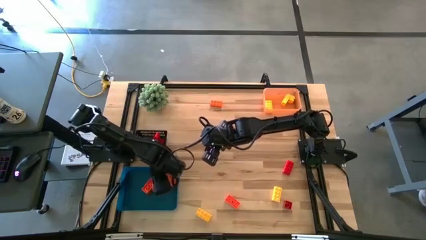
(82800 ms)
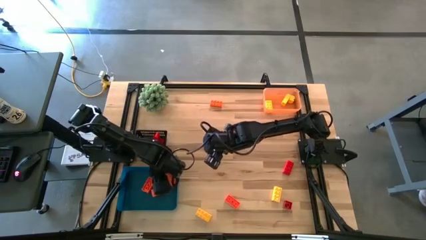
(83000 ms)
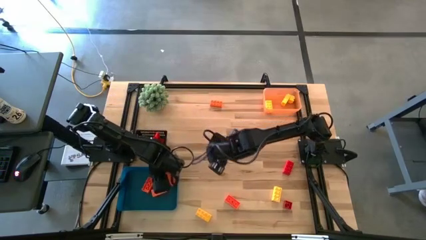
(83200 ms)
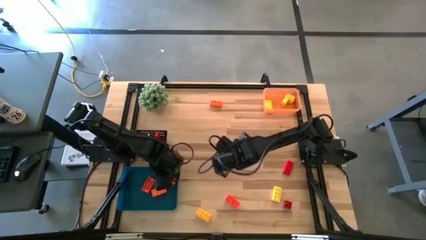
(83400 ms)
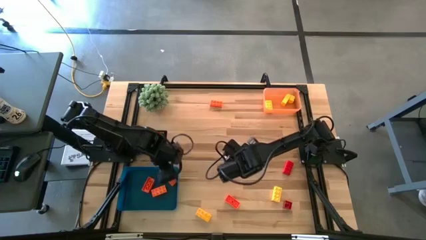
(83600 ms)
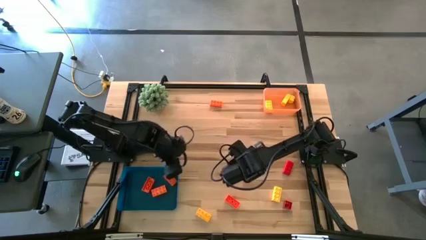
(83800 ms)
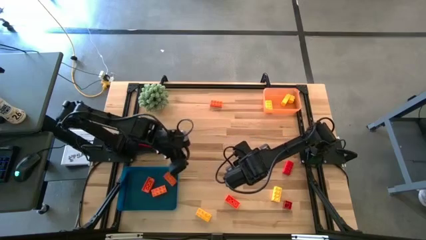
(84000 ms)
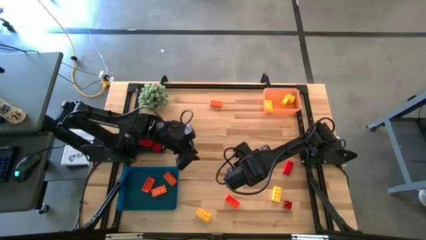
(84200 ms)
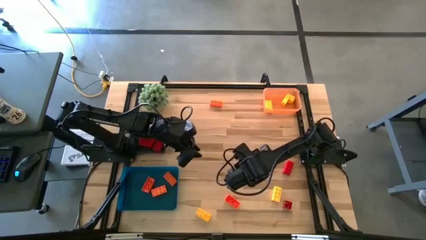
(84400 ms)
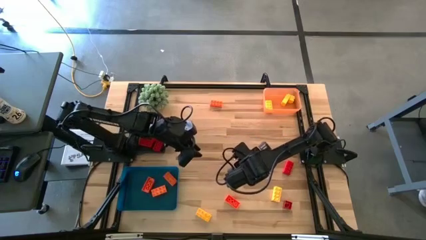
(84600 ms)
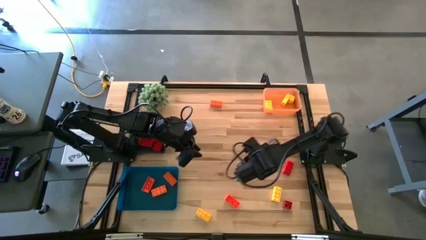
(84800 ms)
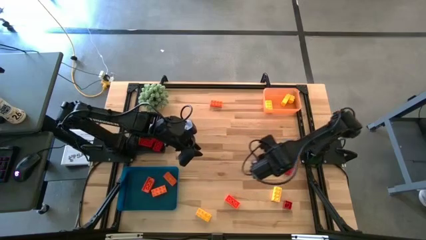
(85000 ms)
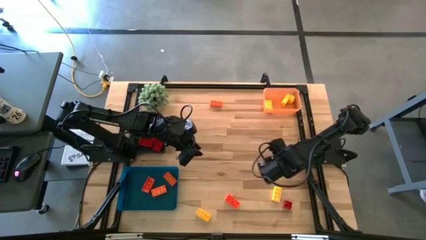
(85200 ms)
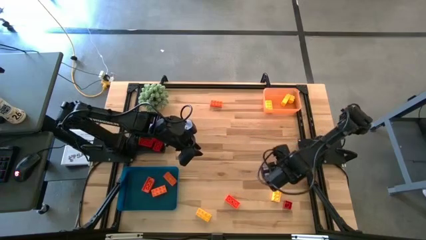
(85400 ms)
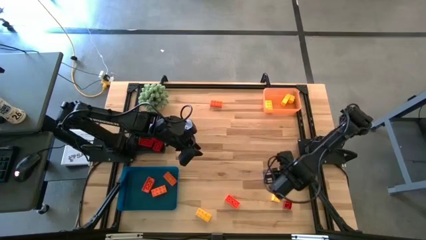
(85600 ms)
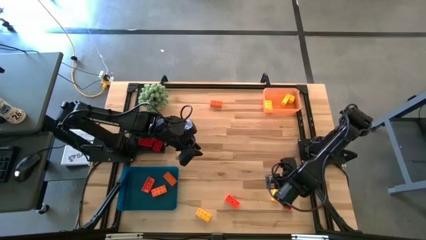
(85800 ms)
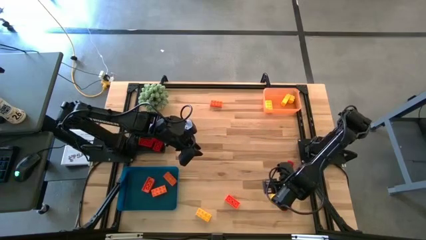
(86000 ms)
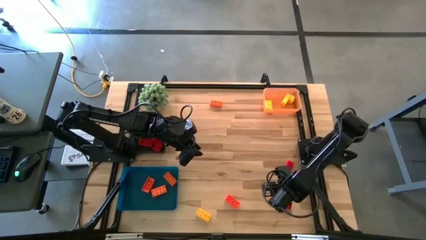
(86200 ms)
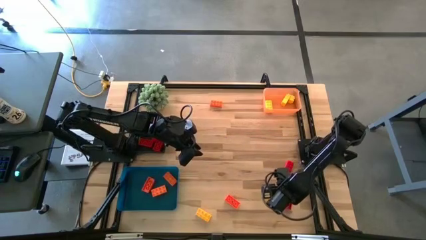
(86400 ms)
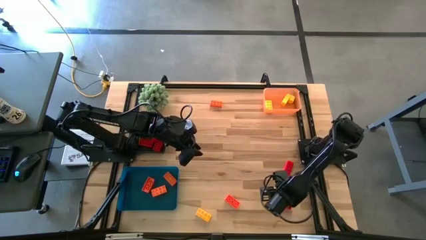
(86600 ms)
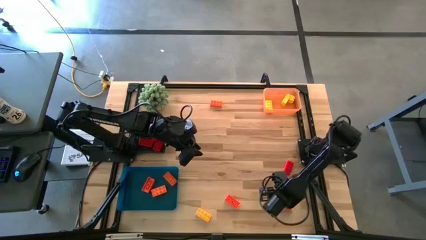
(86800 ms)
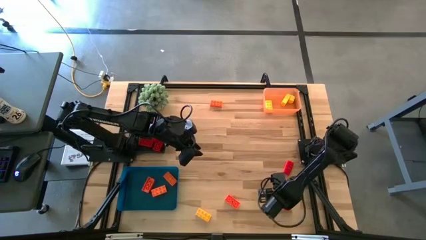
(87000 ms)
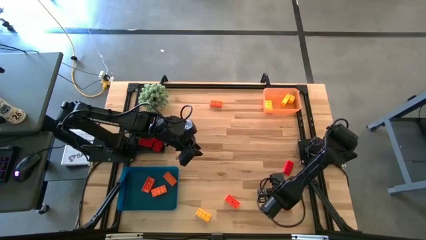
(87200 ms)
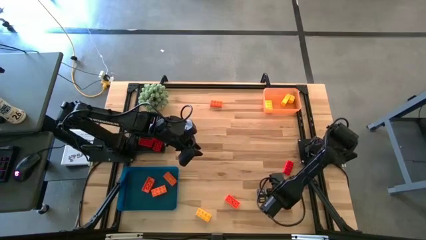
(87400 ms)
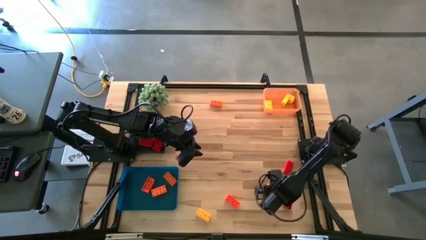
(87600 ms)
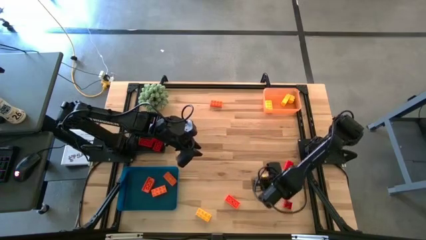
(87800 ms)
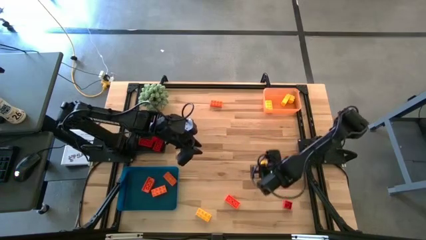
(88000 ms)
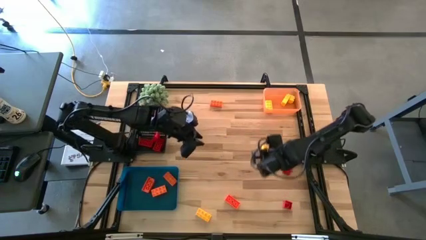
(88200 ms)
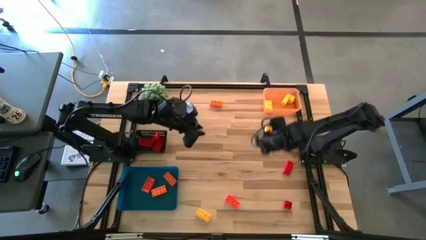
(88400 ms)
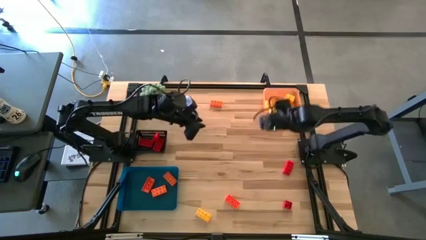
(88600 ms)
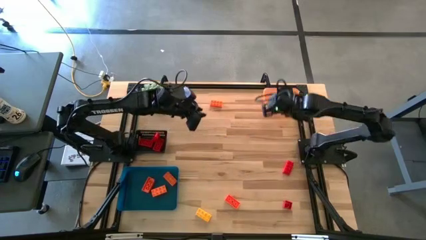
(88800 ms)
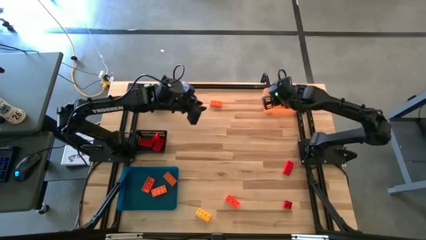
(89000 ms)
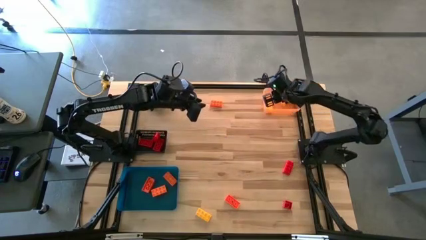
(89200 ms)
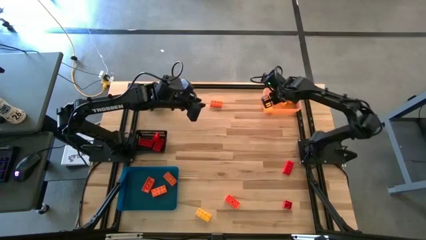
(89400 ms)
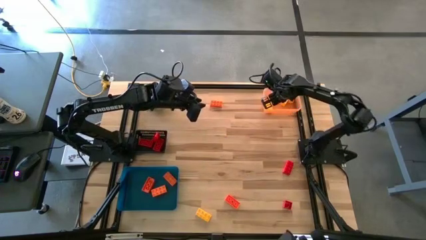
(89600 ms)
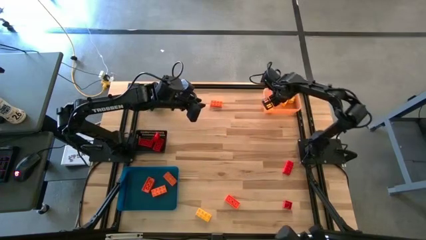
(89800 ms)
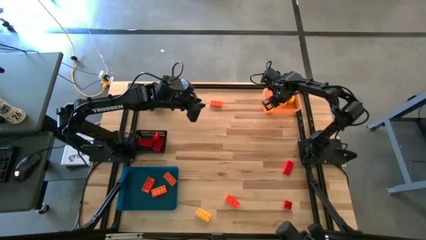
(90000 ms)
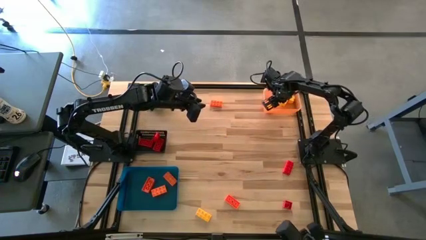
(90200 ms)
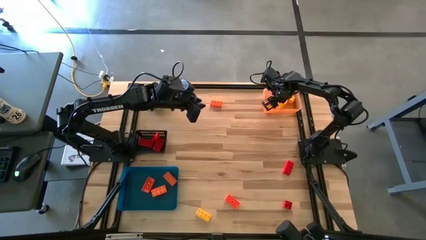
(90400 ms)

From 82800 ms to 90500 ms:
Task: Sort & place blocks by color
Put the yellow game piece into the orange bin

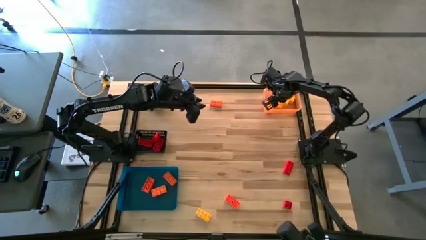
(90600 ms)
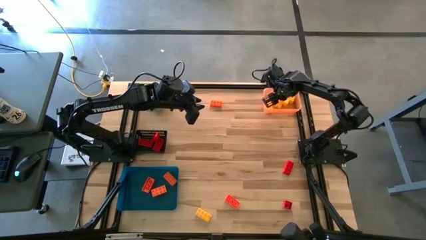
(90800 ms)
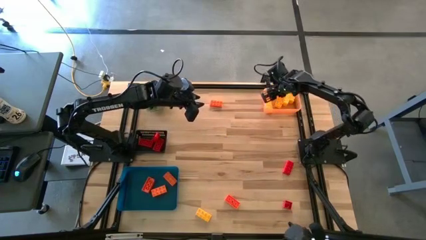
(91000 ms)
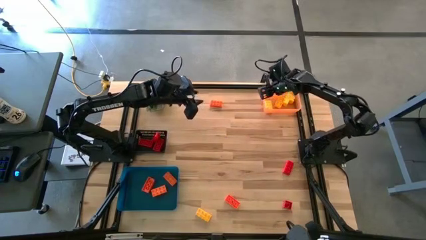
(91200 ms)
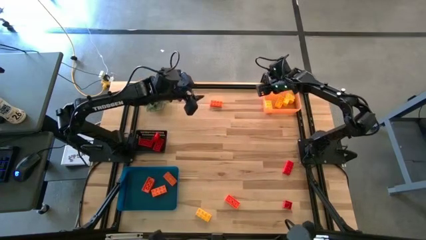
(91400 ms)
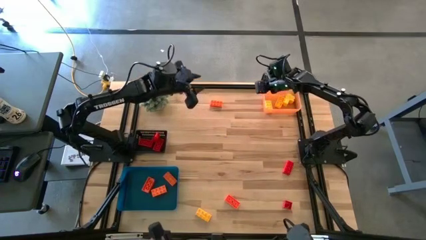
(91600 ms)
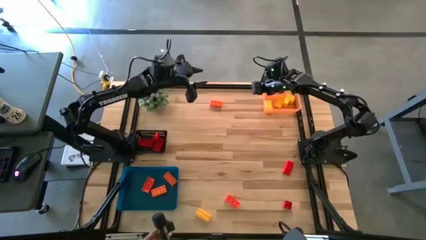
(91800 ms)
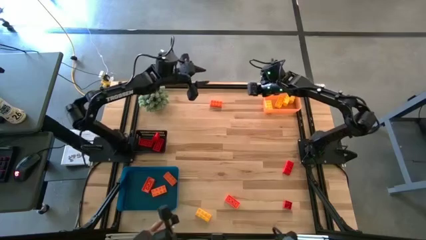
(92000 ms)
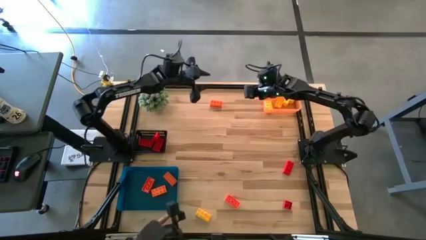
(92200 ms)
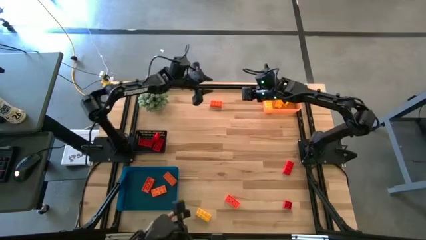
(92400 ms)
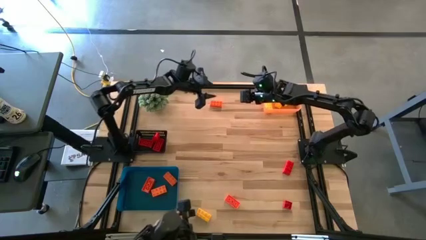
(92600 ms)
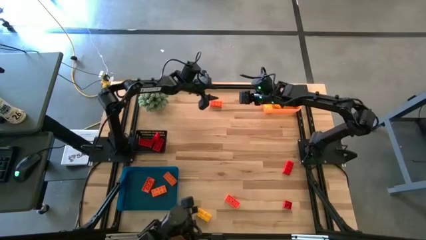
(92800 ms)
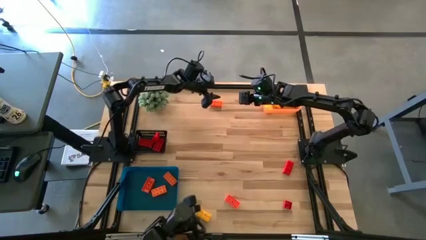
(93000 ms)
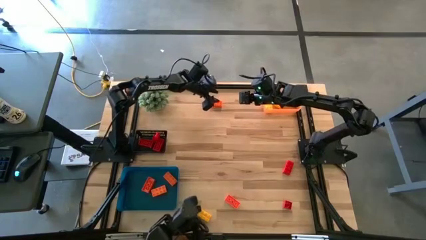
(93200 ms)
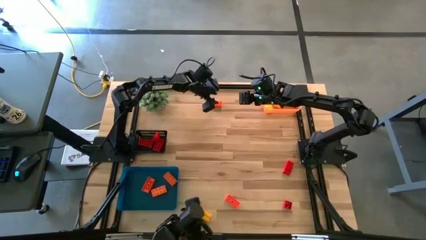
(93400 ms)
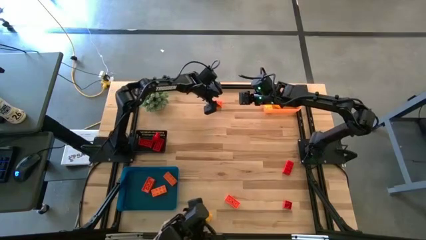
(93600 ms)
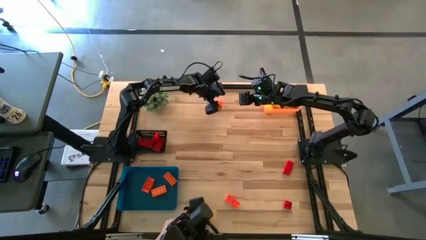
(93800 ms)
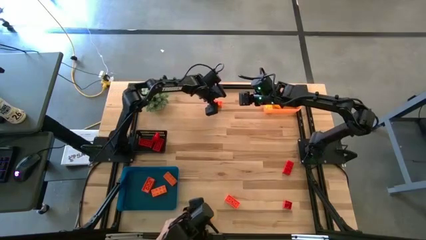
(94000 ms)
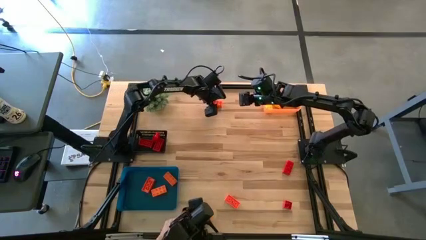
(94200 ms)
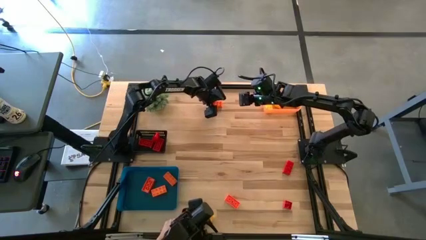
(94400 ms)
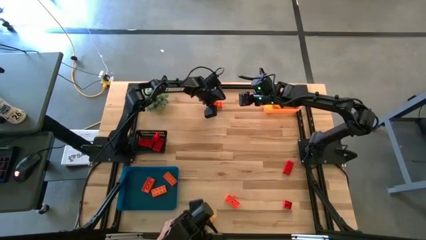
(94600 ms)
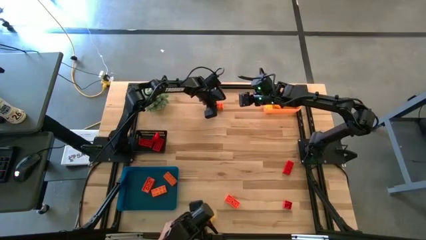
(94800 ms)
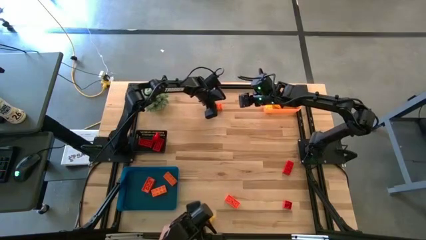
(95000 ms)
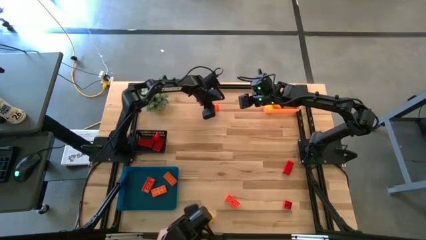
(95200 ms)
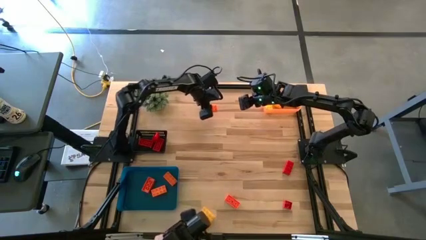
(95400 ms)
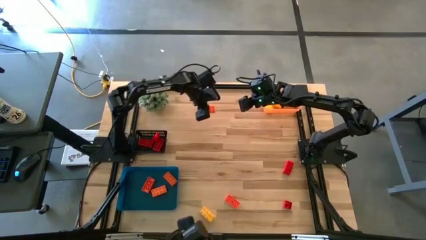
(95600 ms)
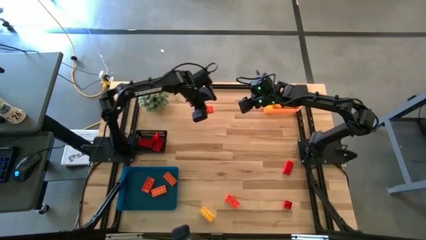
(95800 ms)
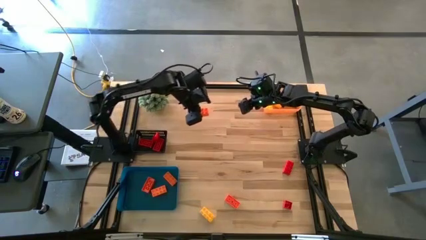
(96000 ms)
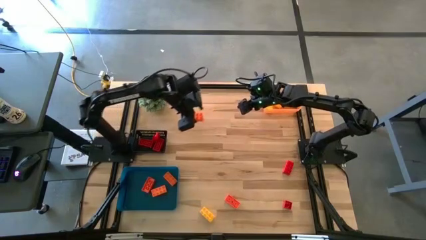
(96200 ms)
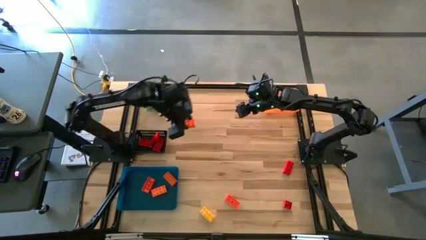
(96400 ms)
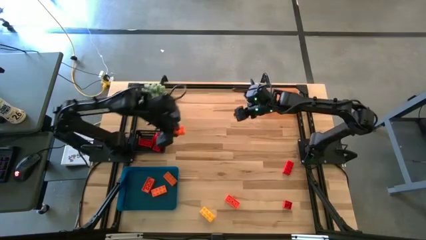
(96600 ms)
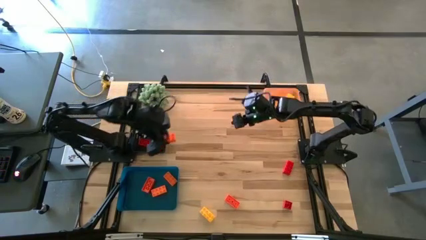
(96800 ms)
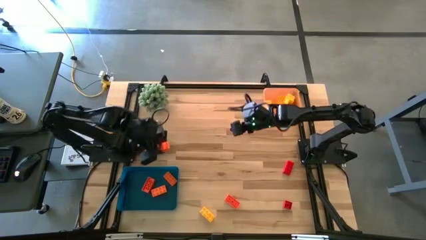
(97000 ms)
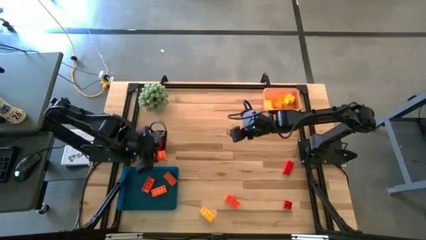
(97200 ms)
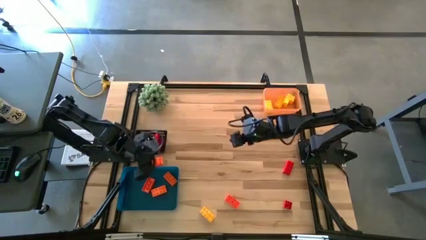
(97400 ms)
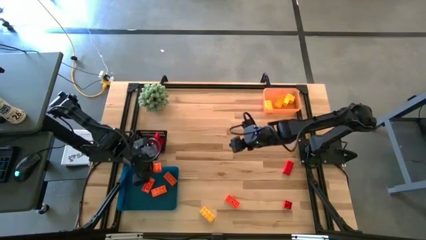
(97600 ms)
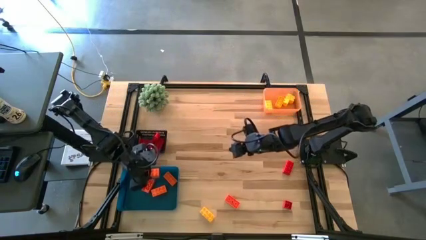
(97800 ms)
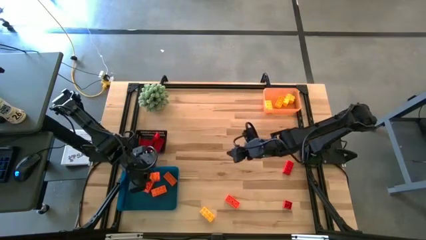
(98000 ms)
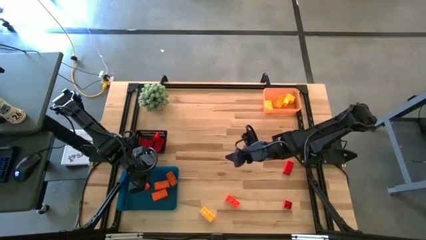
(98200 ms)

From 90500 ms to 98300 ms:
Put the orange game piece into the blue bin
